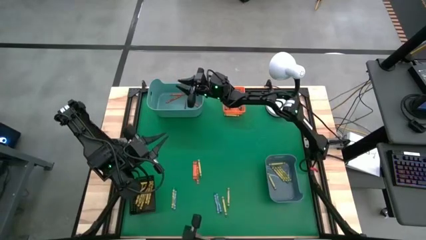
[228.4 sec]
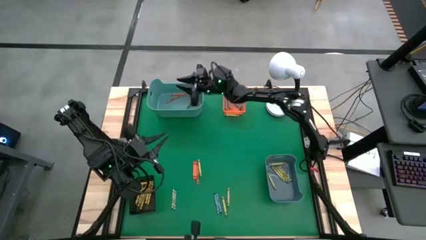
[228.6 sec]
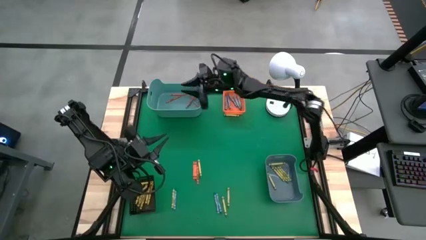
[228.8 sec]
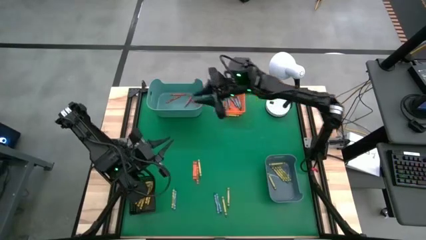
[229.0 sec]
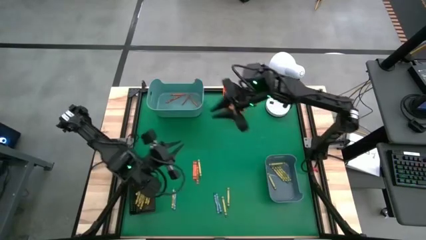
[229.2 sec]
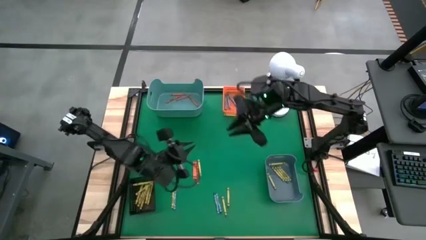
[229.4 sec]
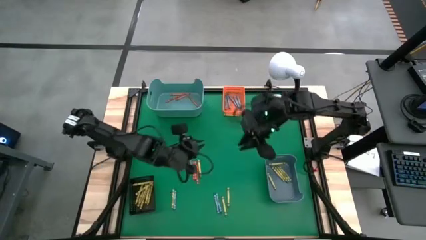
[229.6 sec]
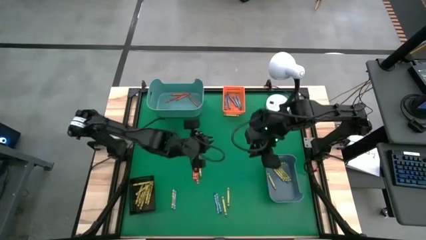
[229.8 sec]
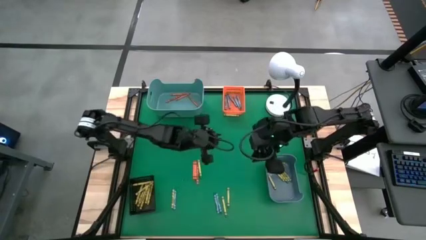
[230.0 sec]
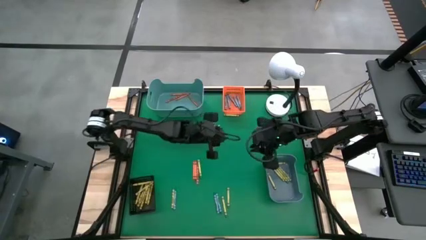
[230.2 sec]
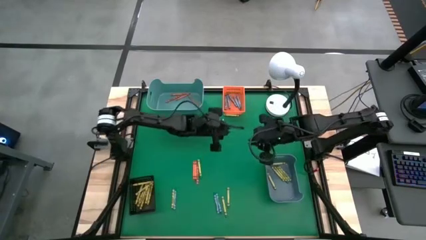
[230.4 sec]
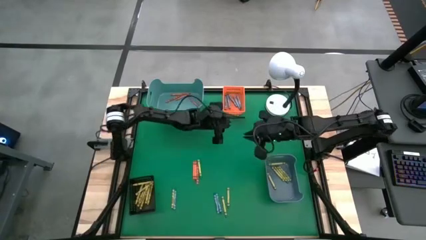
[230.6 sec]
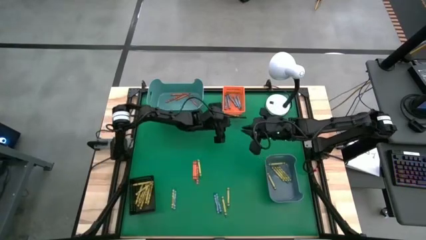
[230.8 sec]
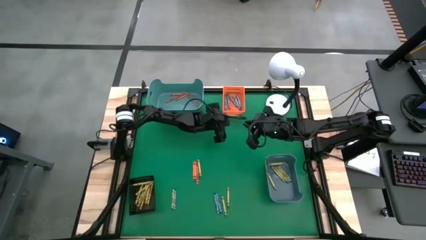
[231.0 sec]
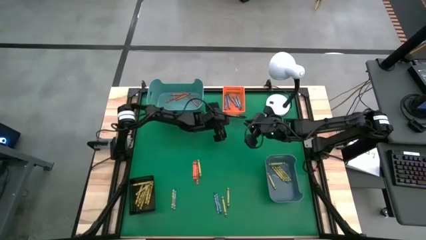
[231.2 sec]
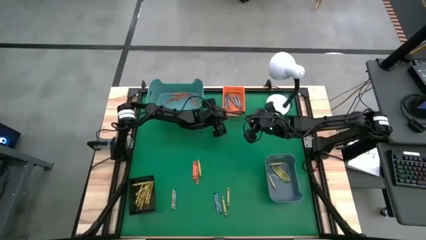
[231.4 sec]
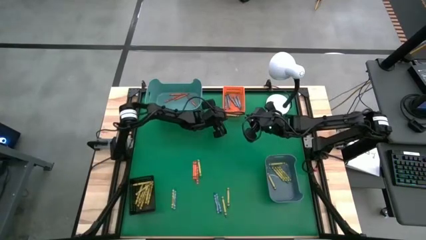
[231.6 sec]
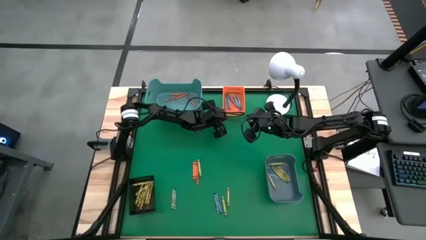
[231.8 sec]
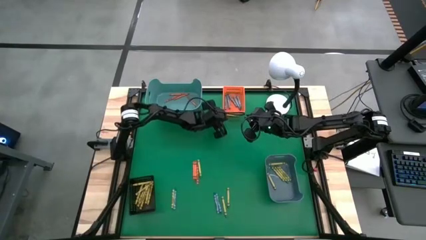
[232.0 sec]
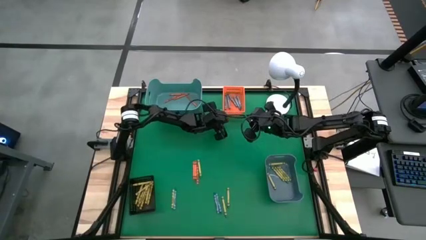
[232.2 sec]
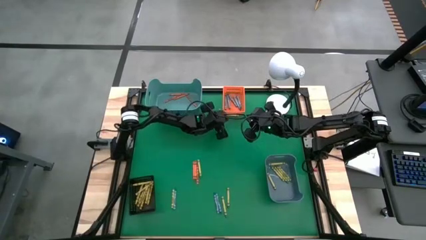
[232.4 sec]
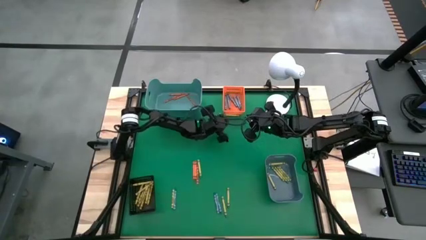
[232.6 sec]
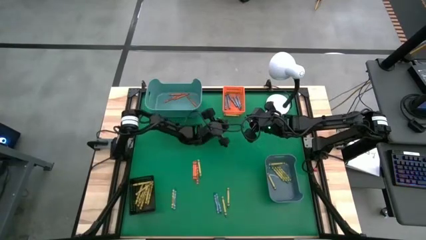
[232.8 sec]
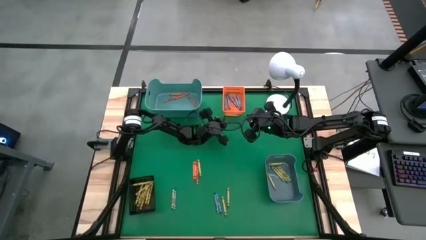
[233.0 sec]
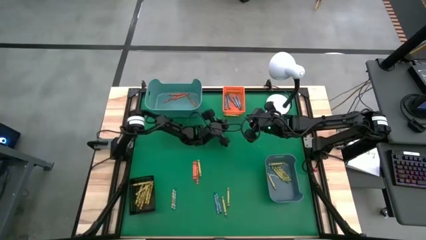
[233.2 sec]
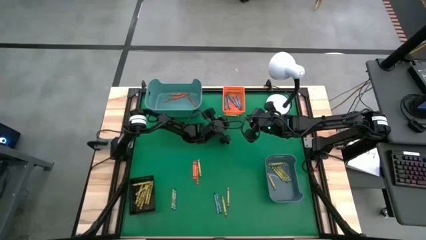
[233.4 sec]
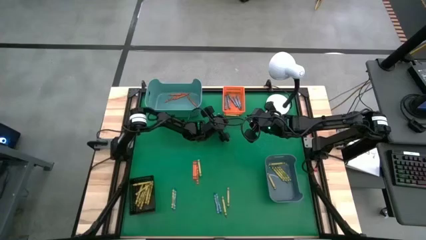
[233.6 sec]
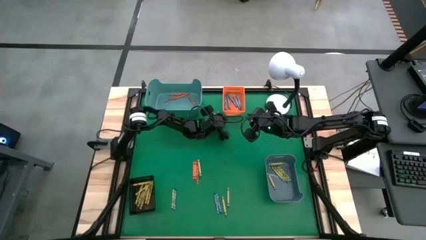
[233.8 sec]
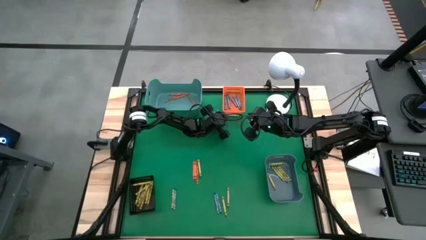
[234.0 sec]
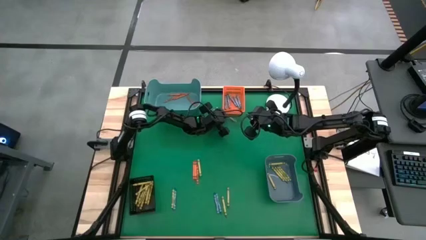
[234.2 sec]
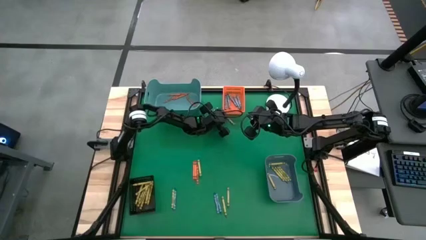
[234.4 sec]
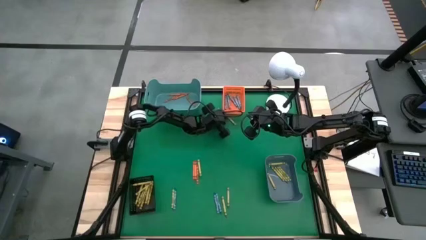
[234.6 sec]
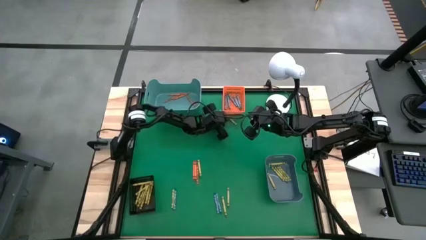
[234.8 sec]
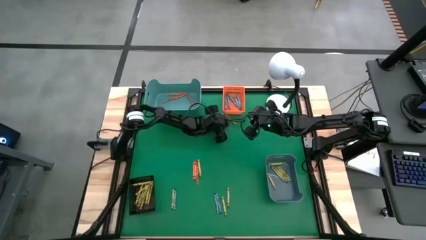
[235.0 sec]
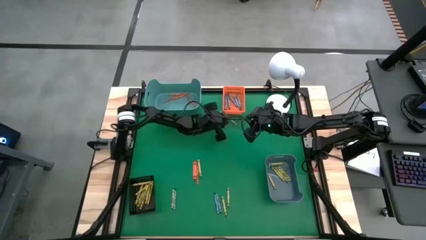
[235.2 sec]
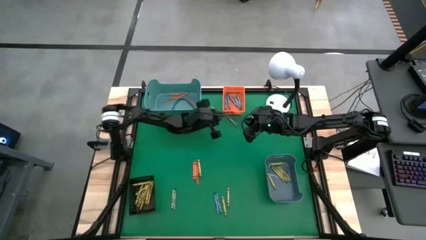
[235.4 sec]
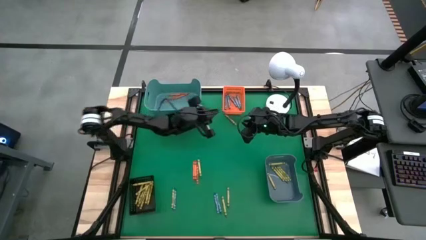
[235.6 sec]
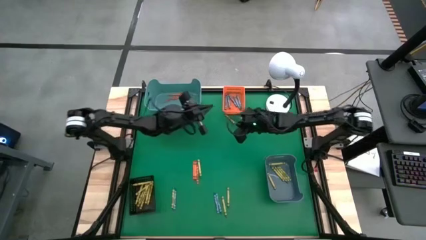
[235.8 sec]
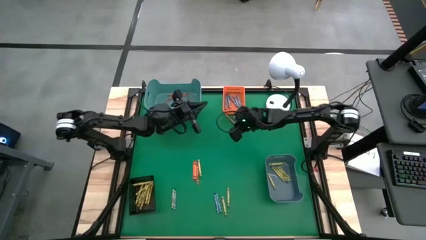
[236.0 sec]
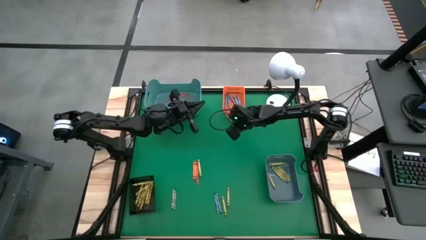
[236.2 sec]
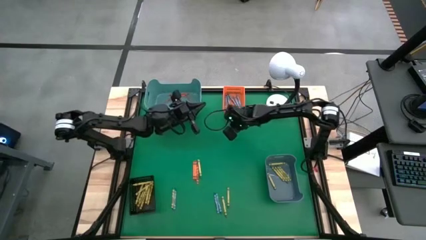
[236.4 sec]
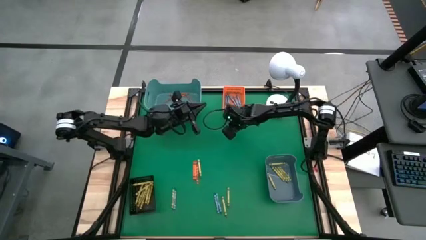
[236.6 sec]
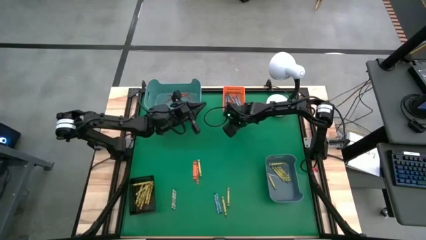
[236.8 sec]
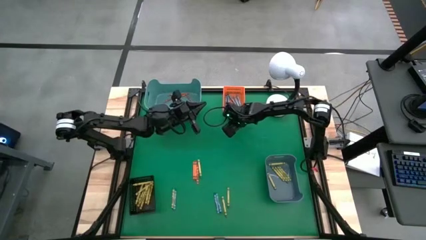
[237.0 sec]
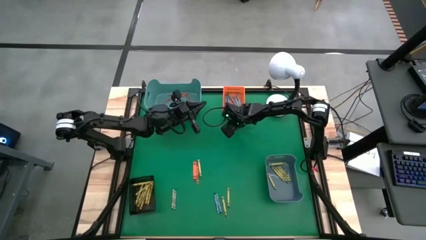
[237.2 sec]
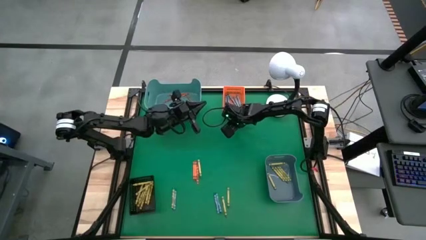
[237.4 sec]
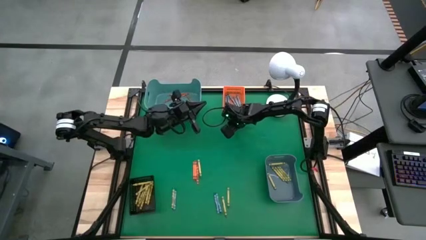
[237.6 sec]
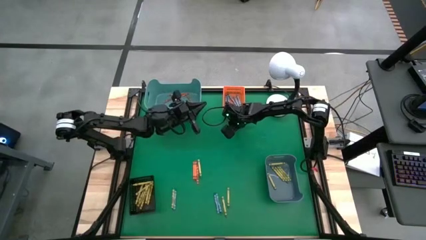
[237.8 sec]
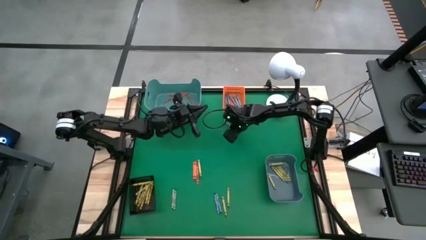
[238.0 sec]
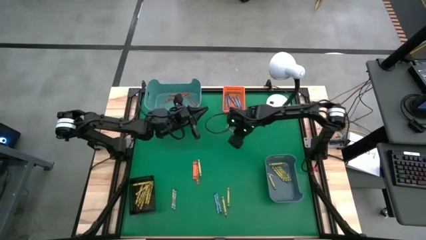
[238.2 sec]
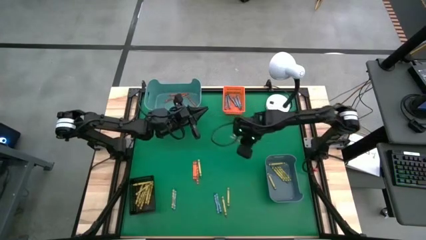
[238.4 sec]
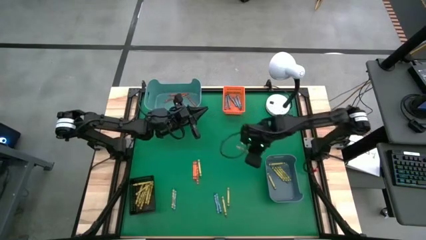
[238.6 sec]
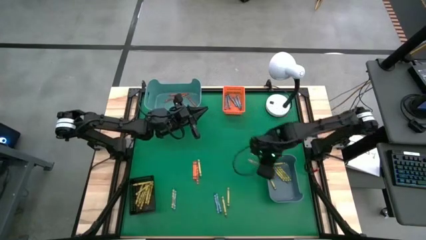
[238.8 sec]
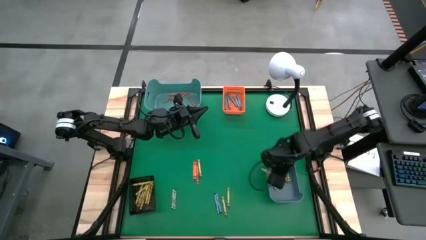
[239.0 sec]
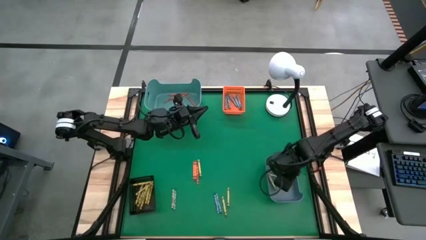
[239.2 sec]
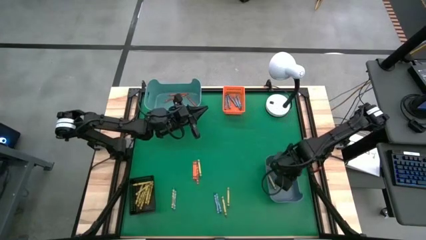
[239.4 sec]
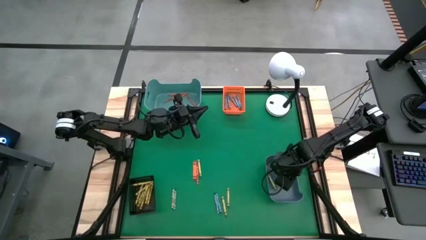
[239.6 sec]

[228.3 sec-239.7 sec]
Task: Sort crayons
Put the green crayon into the blue bin
